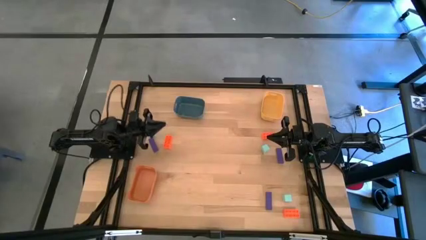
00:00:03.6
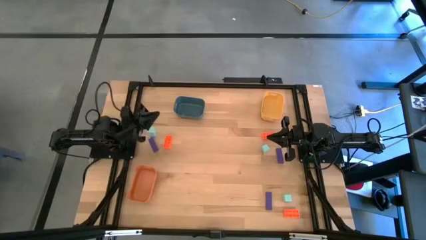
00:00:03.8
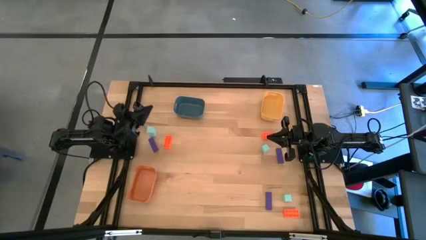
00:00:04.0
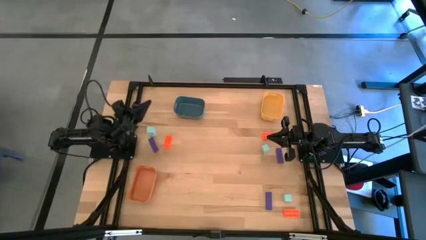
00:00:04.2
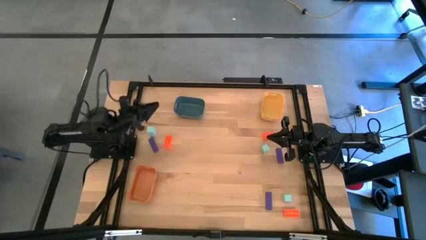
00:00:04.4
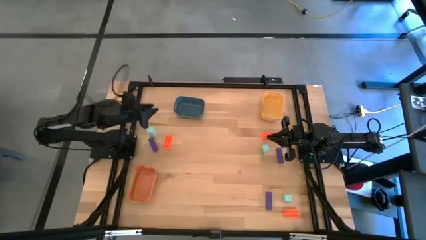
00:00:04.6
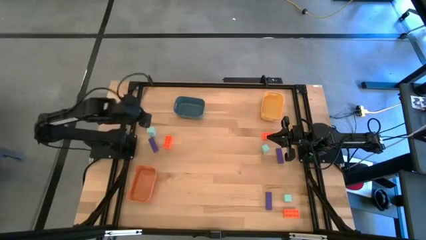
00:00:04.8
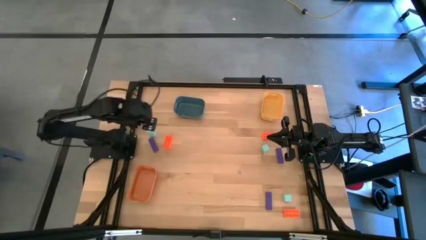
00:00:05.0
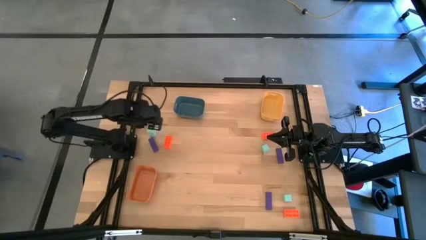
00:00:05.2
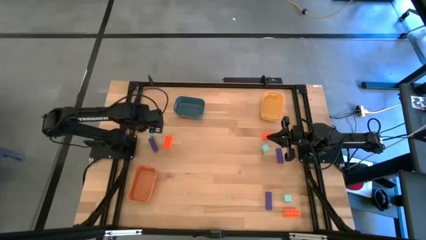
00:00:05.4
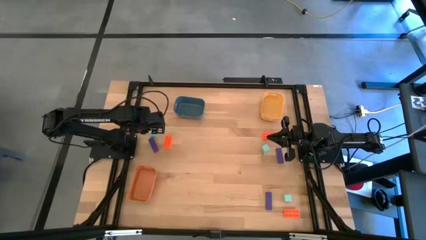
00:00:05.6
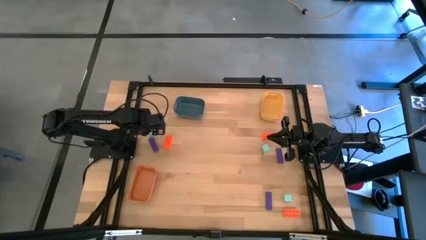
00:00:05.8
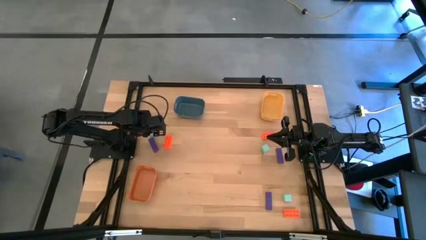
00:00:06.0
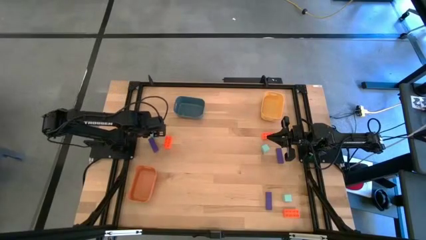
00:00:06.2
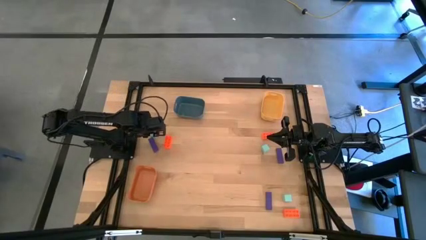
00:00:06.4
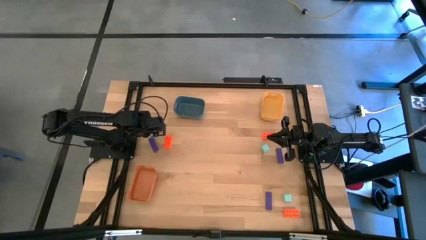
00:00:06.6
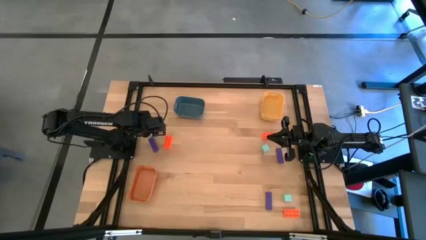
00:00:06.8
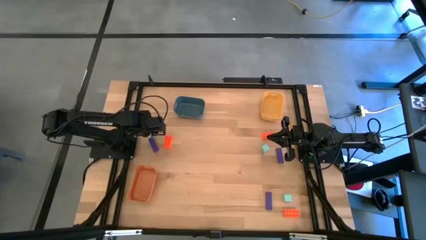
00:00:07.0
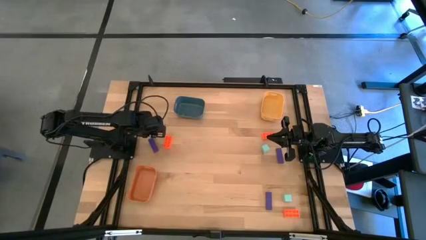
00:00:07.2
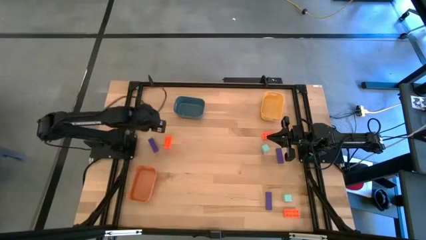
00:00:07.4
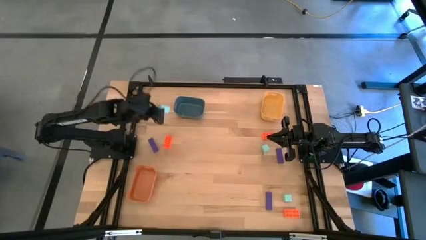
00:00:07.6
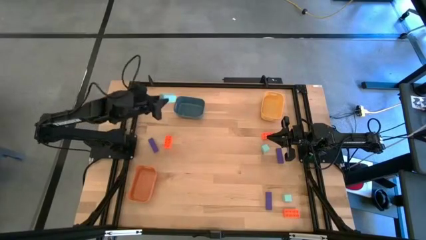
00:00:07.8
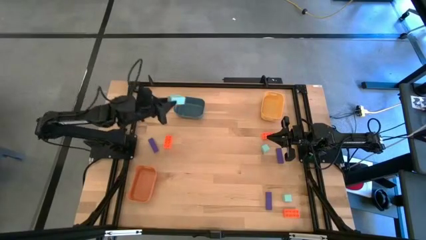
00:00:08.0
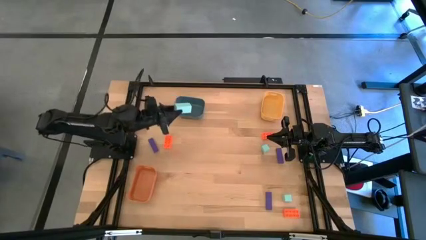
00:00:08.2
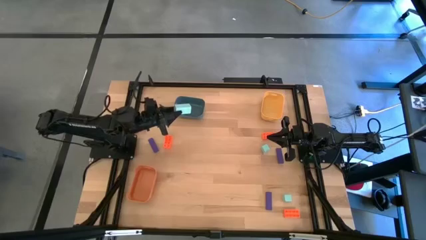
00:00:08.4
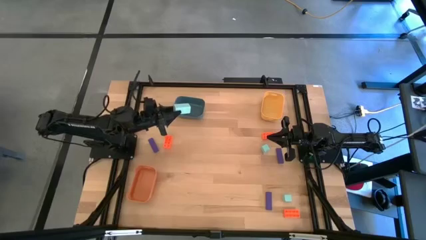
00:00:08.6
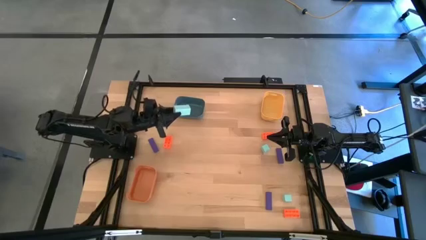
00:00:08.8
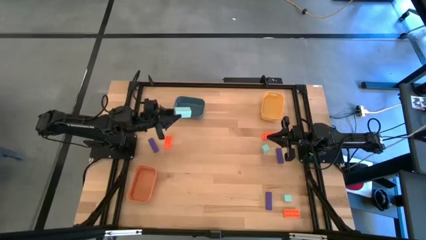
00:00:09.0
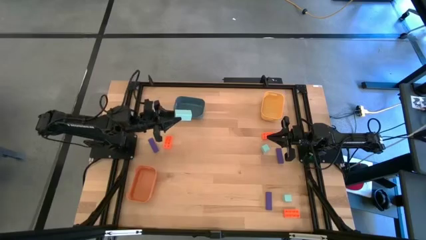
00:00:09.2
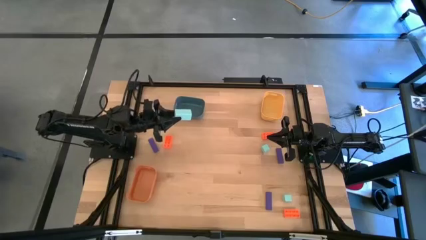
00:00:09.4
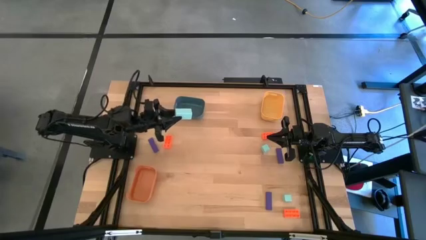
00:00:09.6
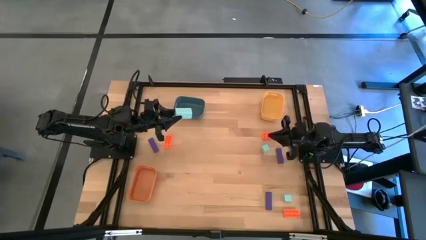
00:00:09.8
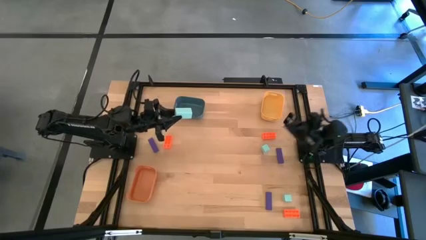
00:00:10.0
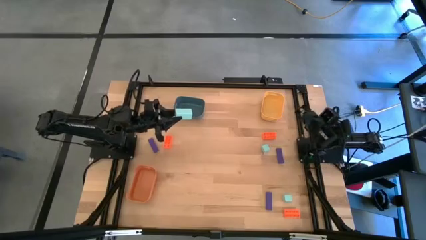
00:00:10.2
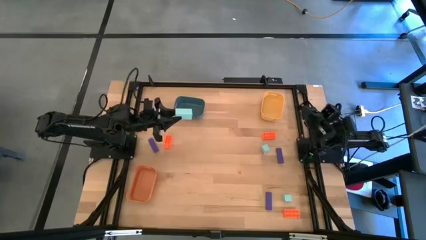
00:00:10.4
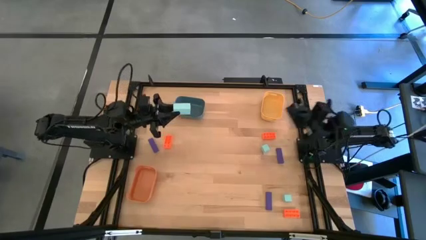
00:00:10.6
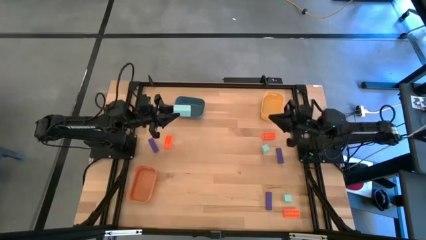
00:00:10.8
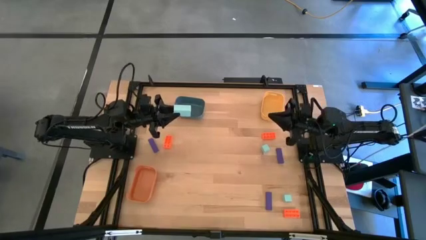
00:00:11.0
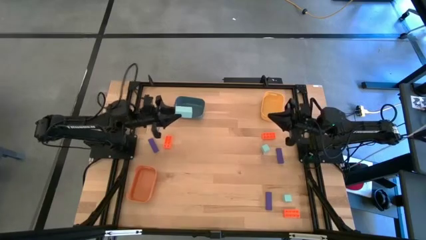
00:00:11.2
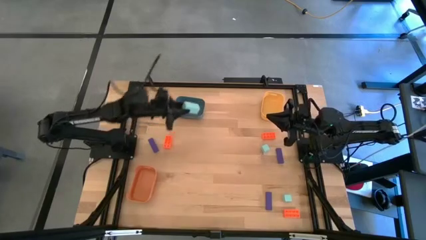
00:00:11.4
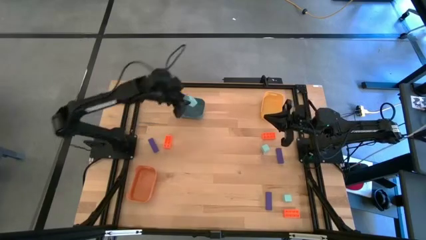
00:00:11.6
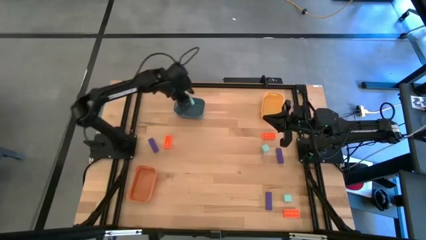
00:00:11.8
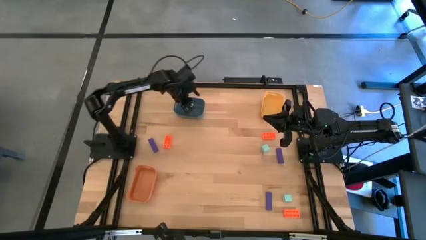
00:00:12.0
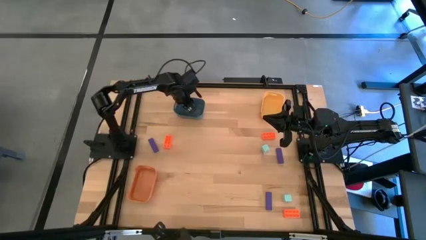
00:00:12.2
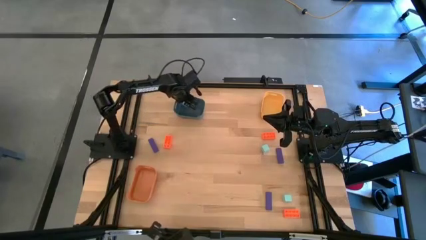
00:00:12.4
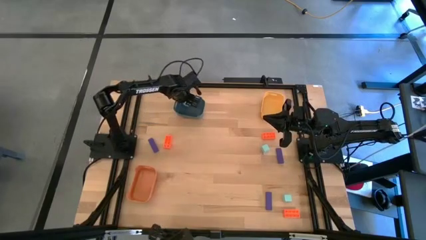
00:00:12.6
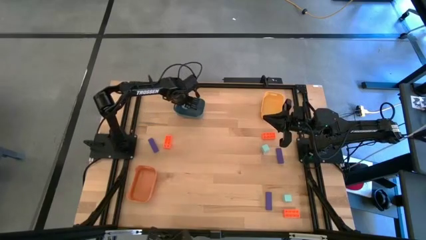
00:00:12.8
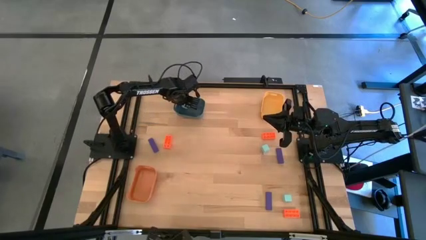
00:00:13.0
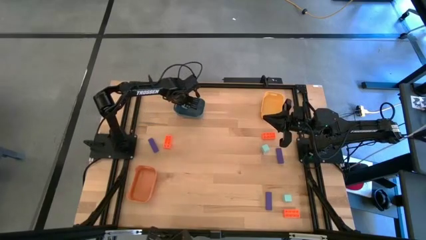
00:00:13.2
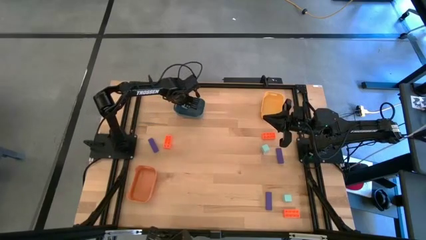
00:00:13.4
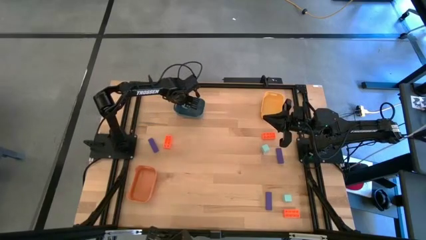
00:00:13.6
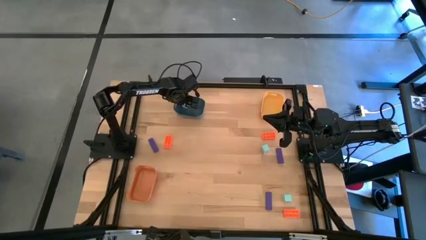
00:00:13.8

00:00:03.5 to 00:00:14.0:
Task: Sort & place blocks by color
Put the left sky blue block into the blue bin

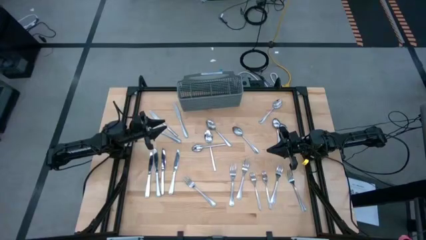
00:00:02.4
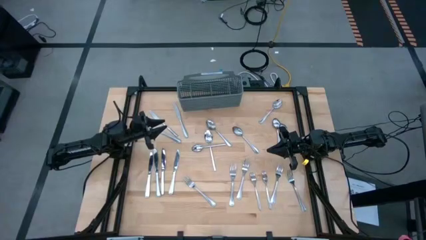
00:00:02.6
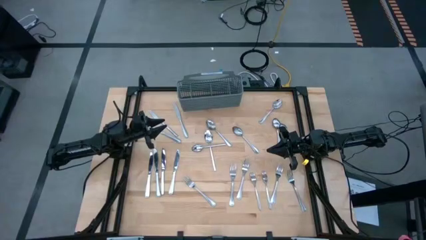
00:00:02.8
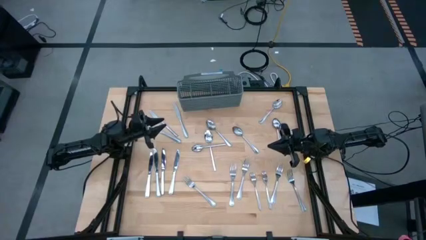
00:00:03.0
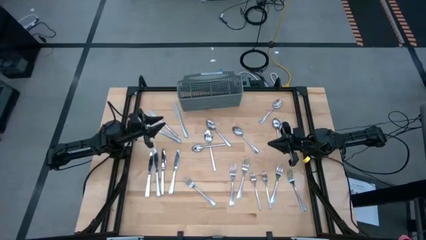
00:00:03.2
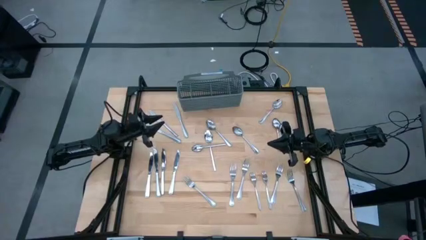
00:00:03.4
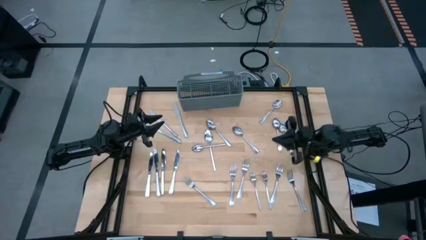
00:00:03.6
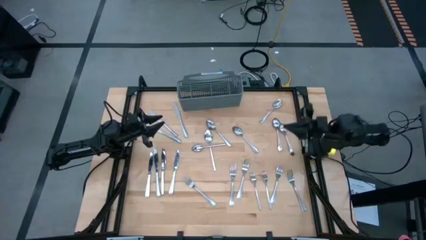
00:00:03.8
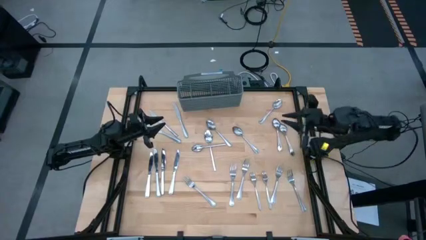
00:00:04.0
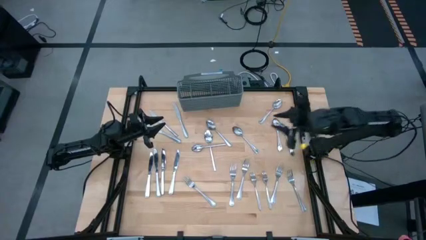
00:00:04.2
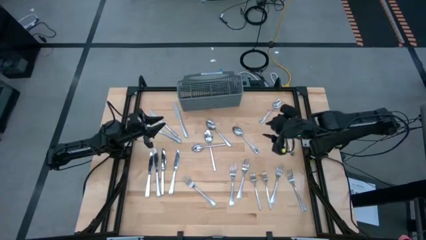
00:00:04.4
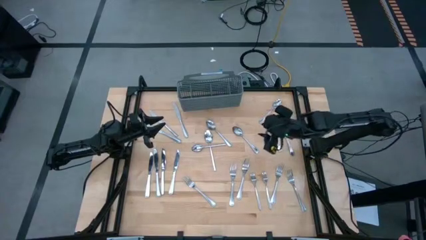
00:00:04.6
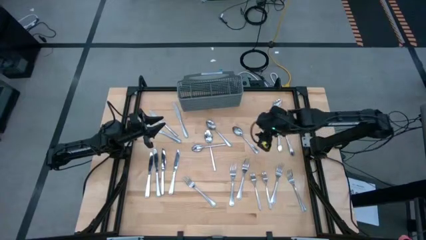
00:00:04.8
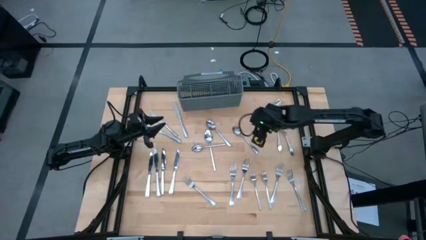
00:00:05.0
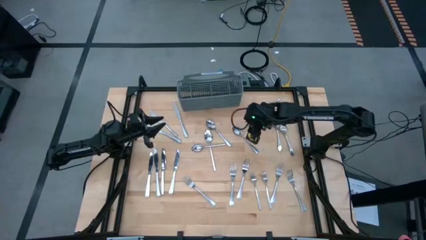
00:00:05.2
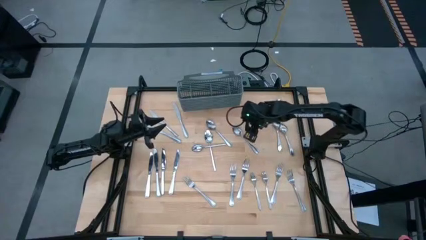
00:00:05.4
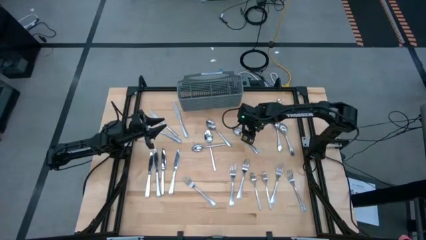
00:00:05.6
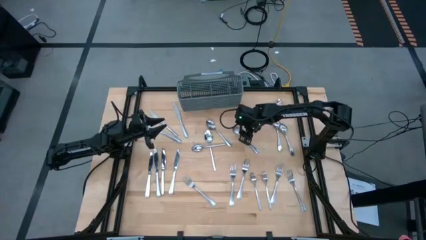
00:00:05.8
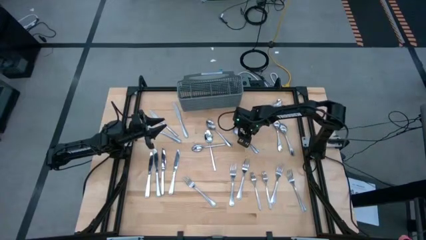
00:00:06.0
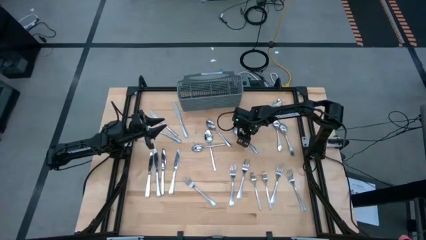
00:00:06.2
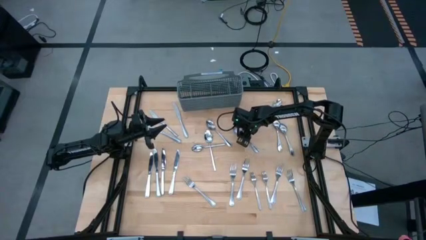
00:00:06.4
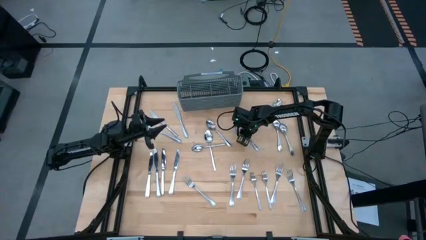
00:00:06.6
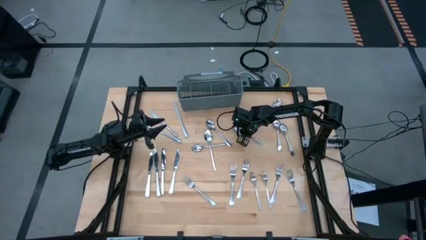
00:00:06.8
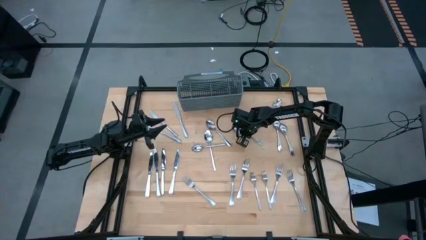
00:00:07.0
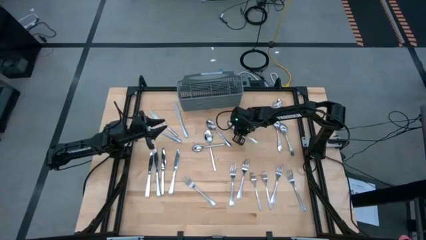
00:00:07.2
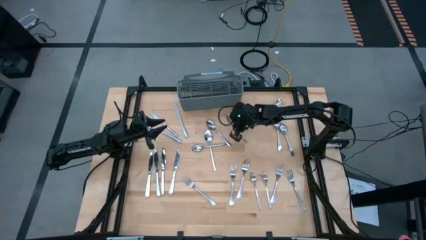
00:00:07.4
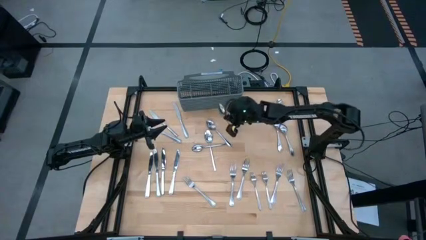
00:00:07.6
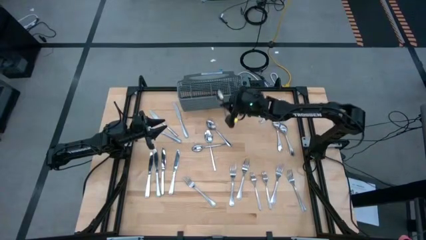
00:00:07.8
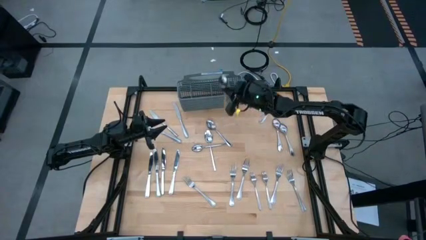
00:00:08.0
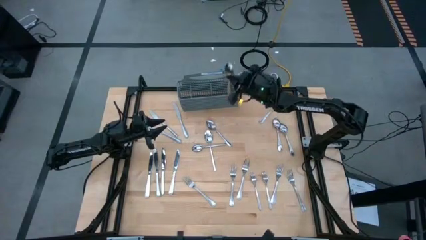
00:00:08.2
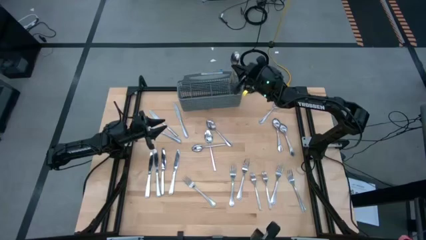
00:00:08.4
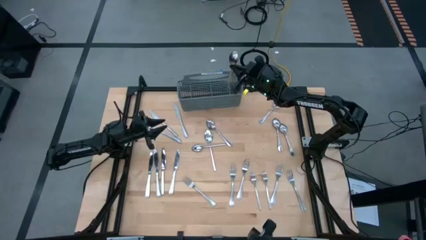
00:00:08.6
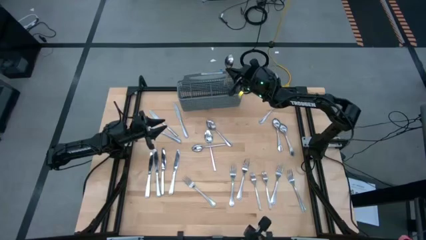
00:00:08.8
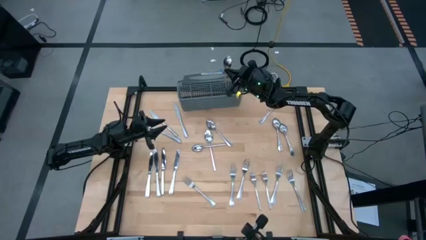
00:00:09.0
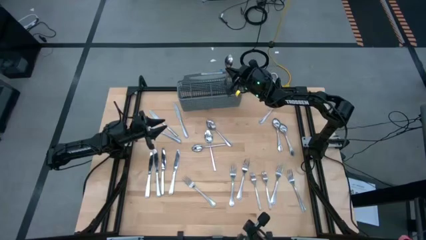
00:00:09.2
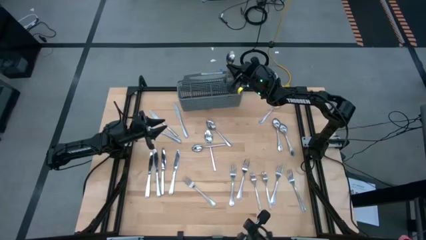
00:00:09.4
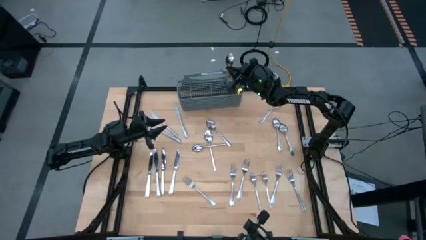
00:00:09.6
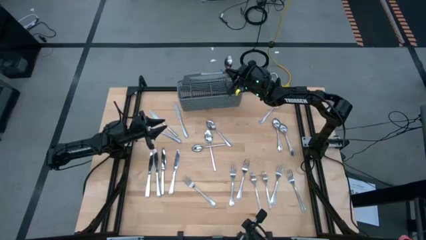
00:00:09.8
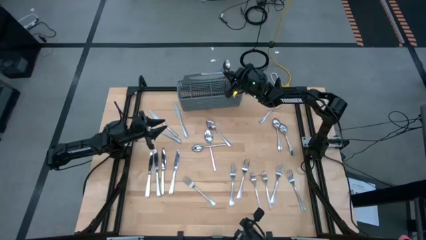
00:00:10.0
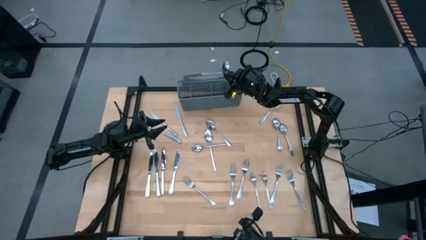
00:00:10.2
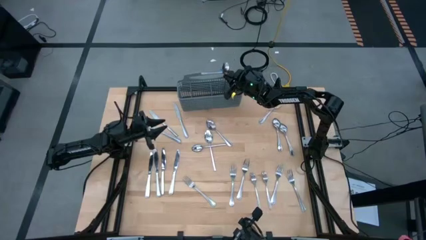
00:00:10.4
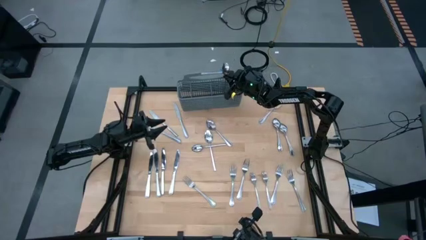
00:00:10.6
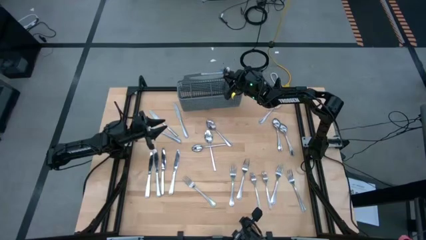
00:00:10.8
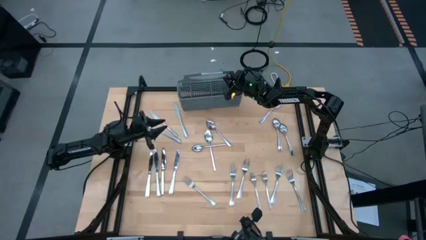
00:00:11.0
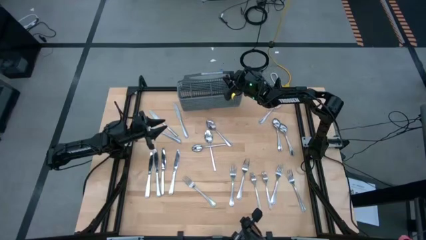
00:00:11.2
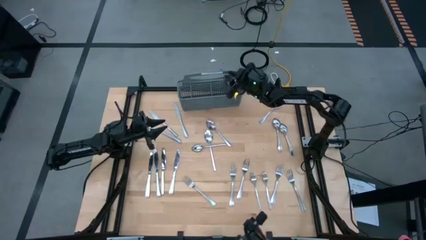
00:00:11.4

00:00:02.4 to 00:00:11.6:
Task: Sort silverware
Put the silver spoon into the gray utensil holder
